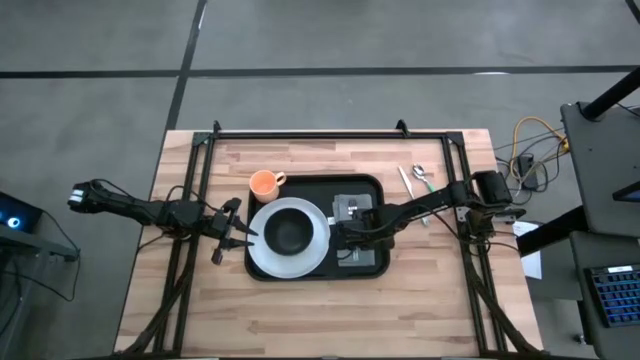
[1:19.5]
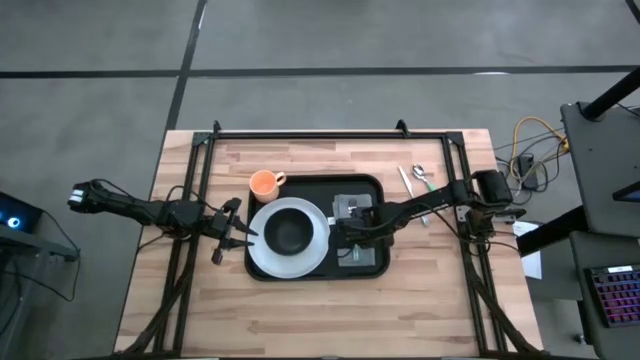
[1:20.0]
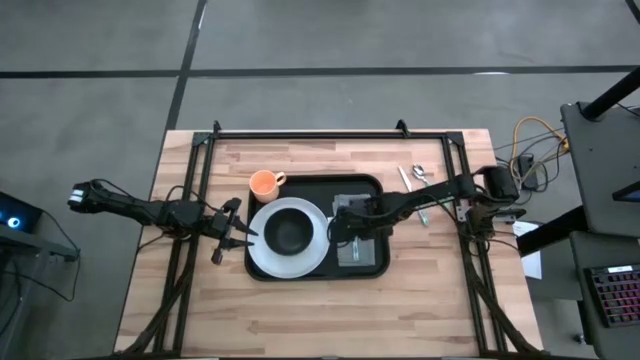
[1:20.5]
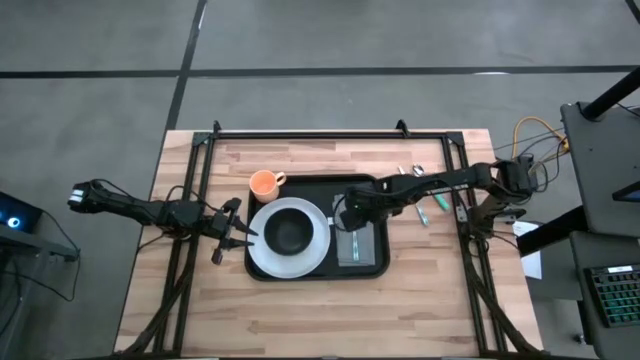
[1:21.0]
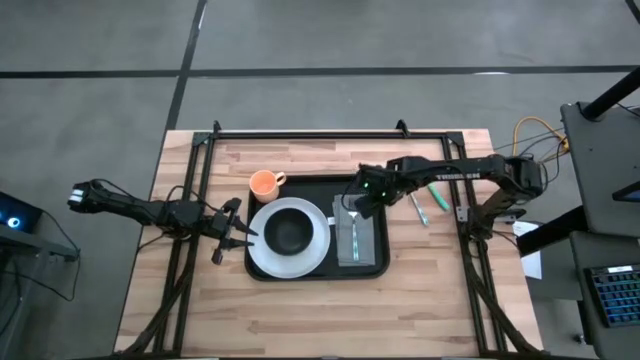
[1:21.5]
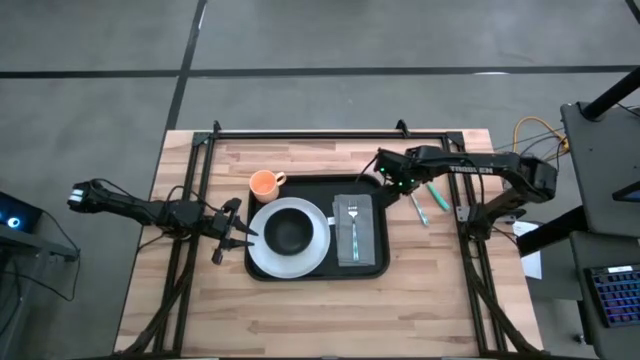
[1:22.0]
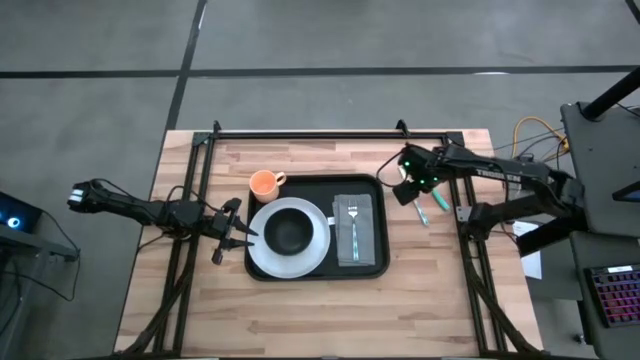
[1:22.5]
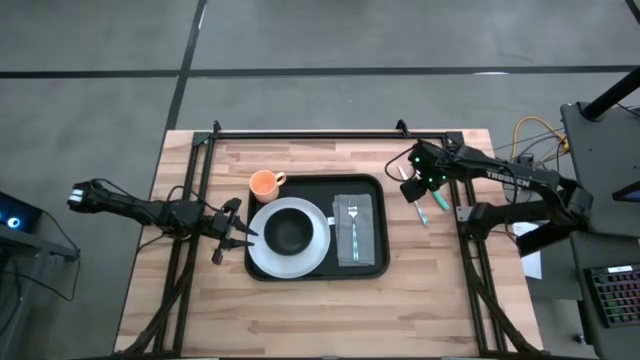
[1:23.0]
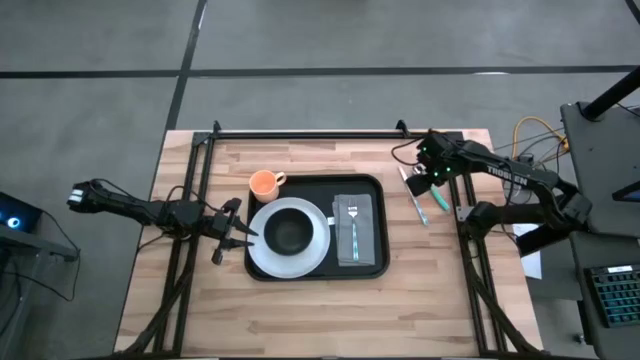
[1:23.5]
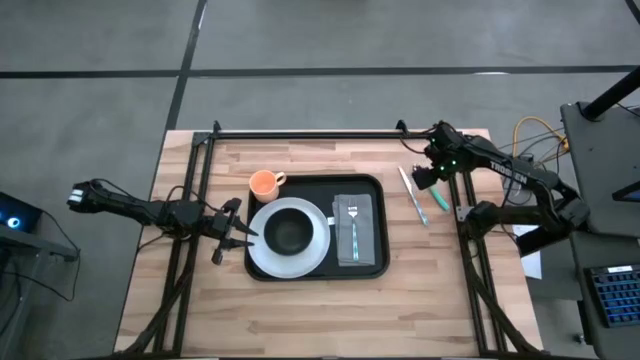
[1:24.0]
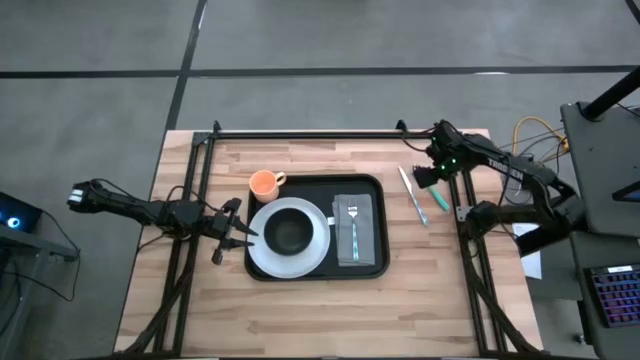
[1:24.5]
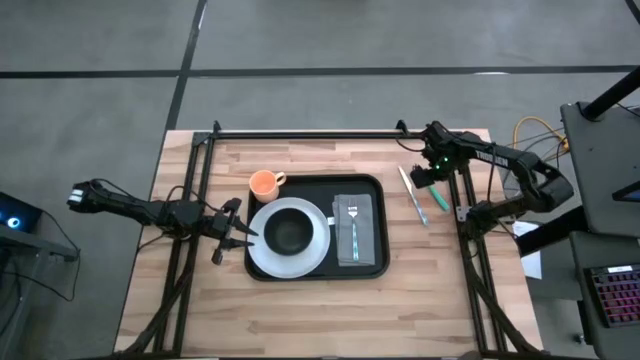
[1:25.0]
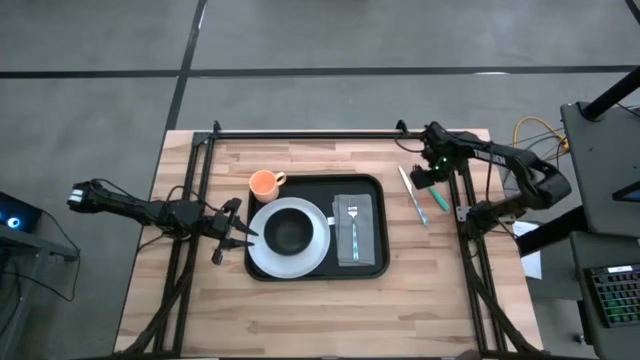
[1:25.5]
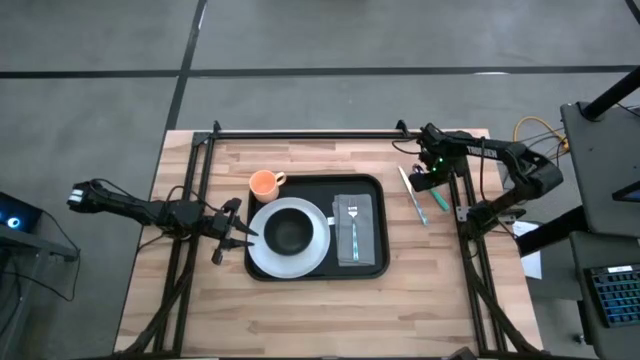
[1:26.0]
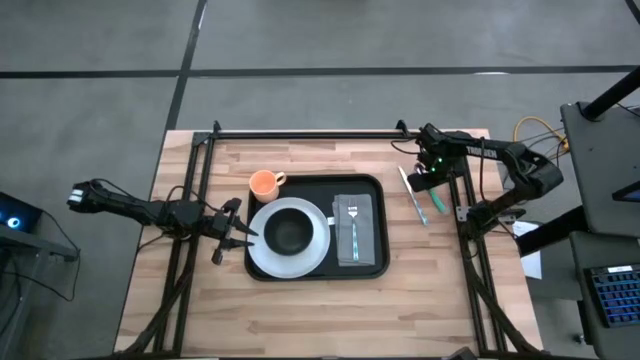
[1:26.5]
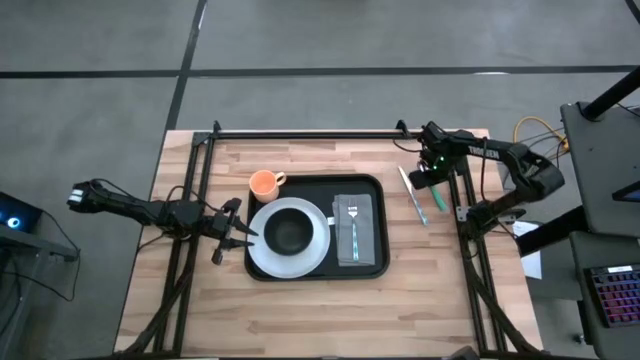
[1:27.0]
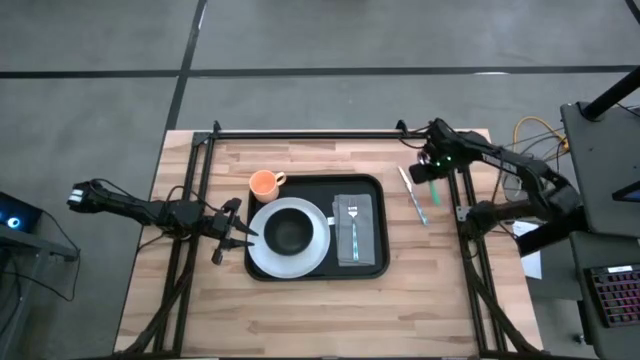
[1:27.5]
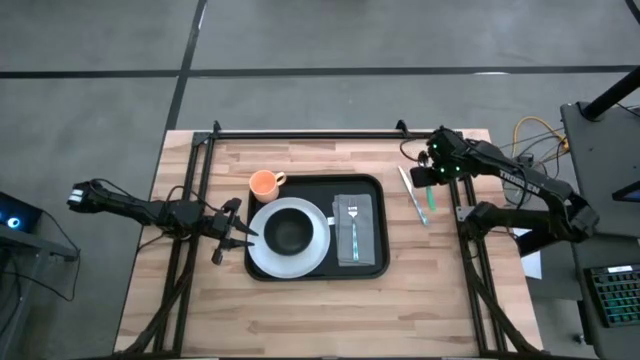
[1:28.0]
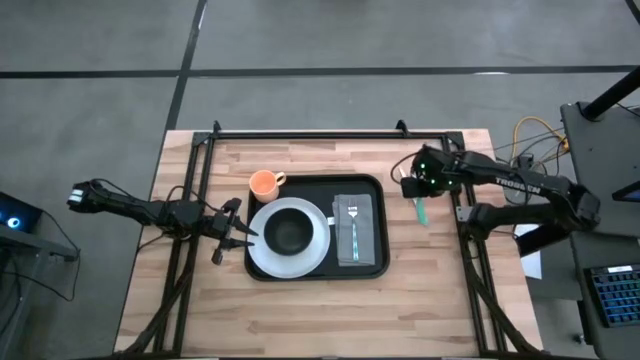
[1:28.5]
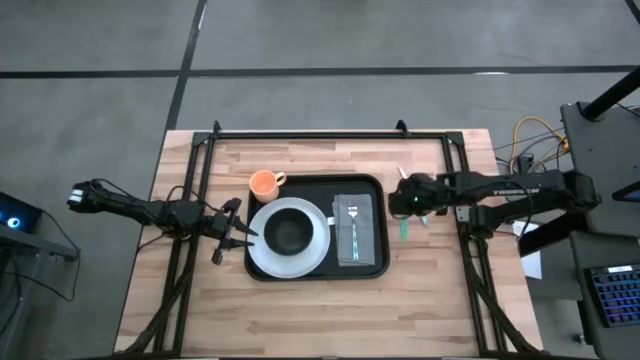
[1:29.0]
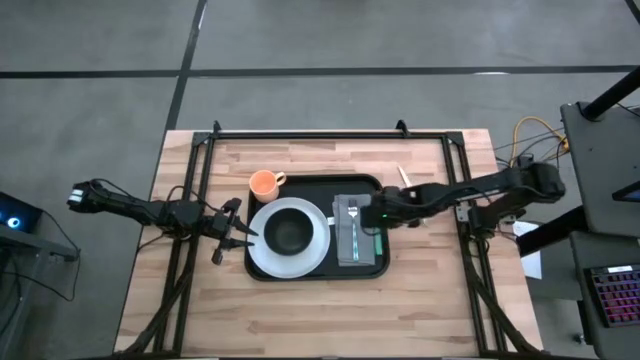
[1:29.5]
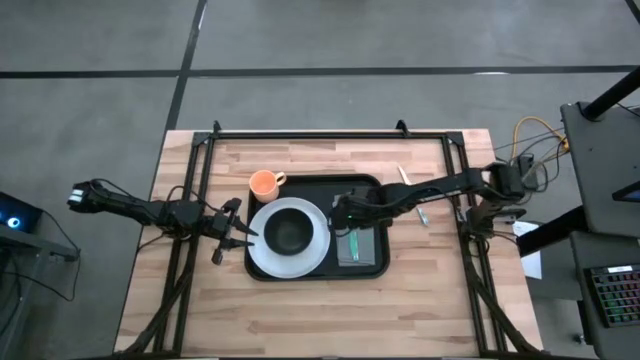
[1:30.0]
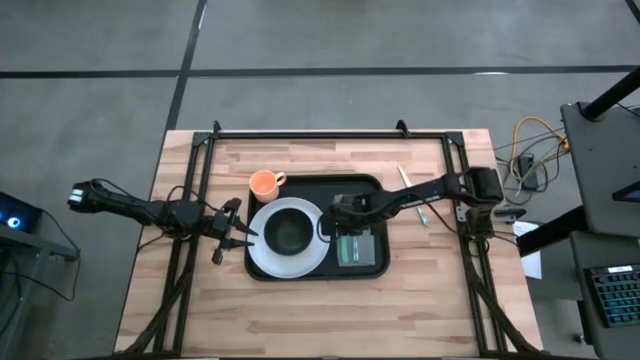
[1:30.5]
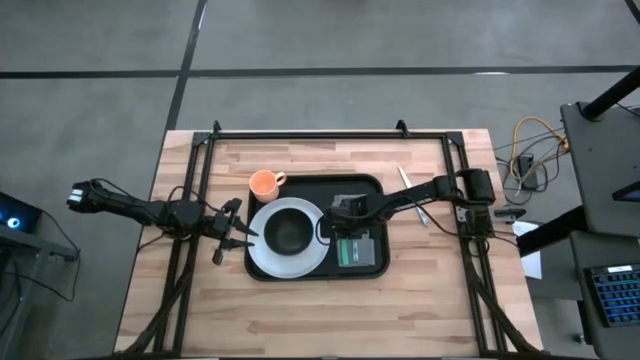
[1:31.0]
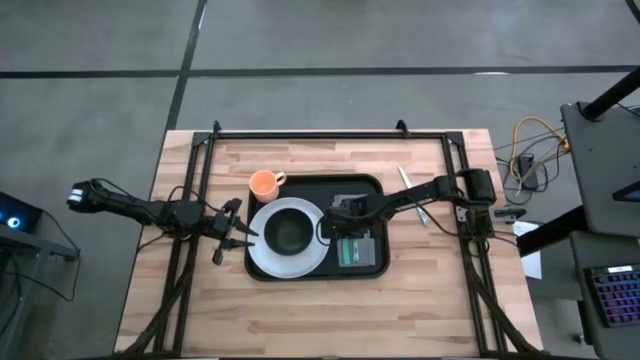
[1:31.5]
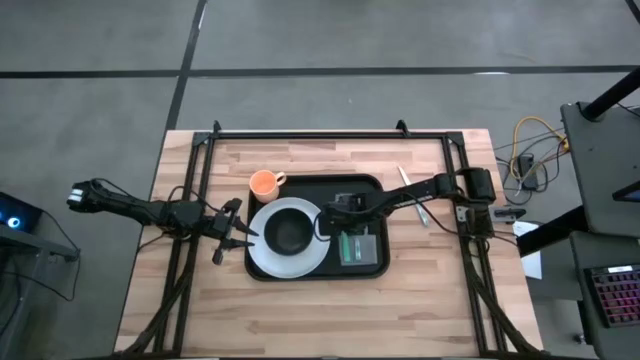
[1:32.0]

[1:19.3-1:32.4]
Task: Set up tray
Put the blue spoon to the left of the white and blue fork on the gray napkin on the black serving tray

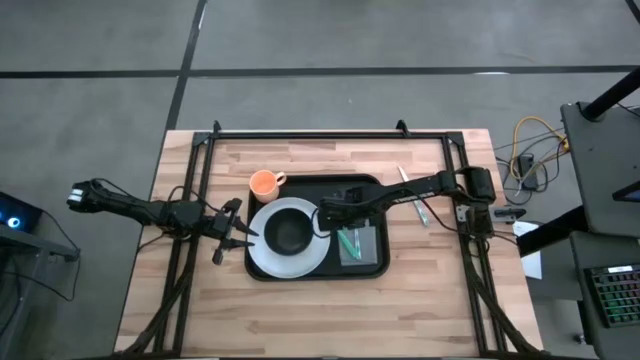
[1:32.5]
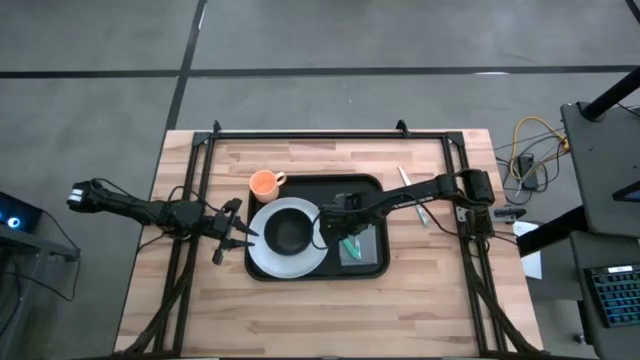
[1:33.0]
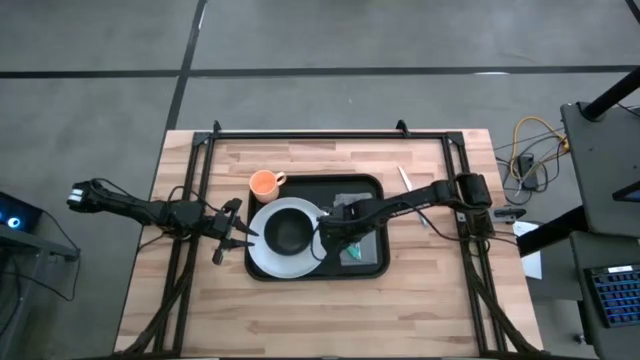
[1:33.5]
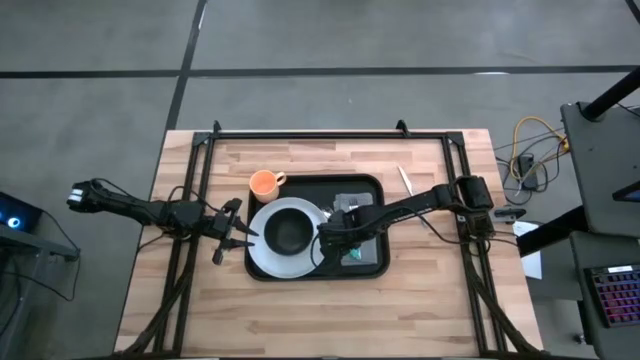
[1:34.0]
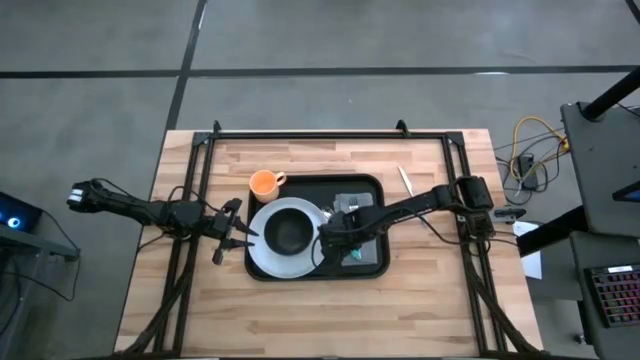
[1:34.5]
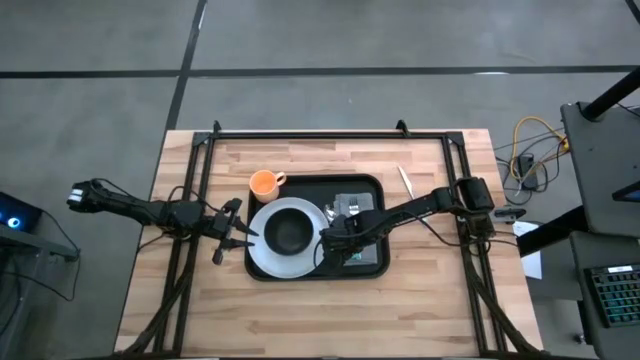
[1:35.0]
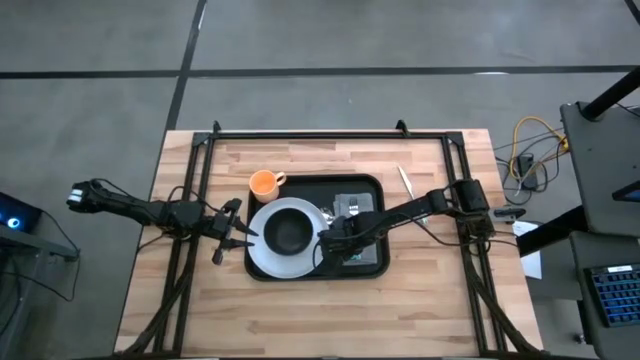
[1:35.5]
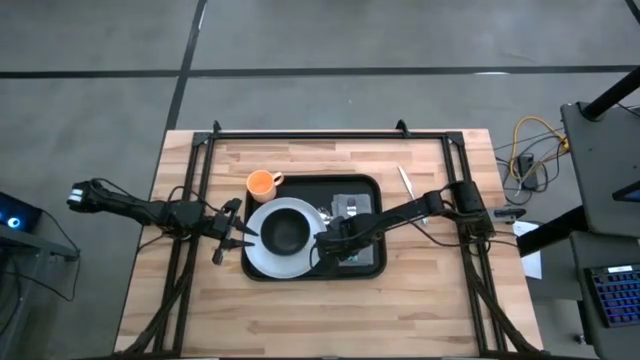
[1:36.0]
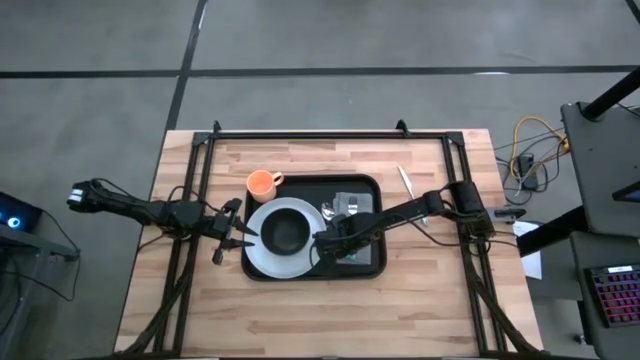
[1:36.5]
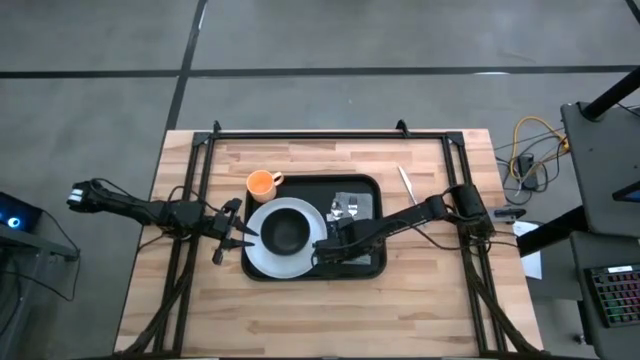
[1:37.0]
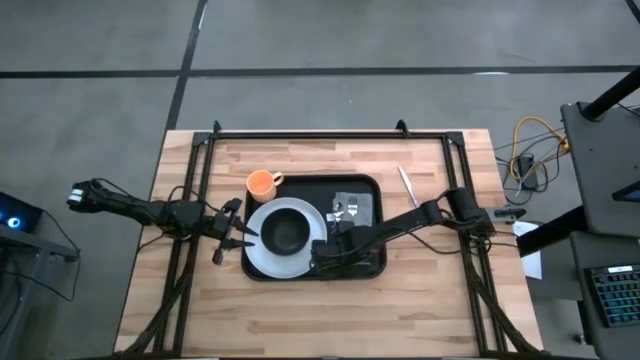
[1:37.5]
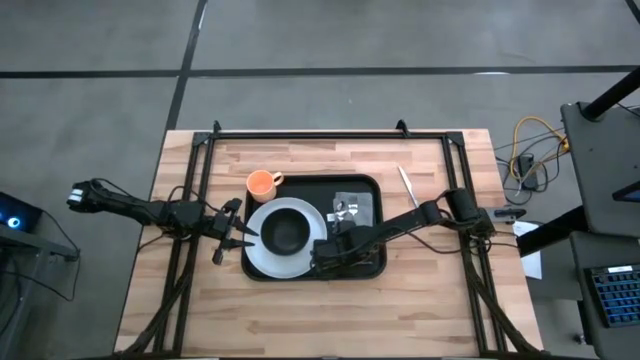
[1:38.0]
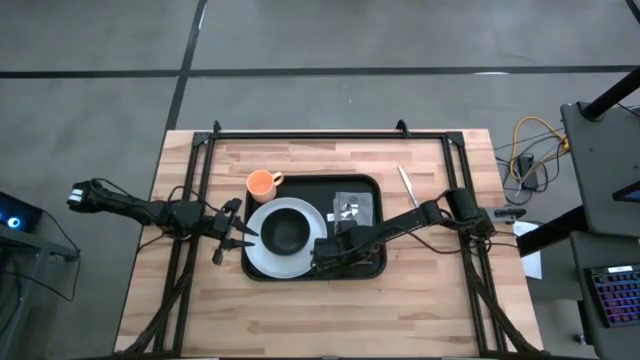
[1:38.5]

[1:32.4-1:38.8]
Put the blue spoon to the left of the white and blue fork on the gray napkin on the black serving tray

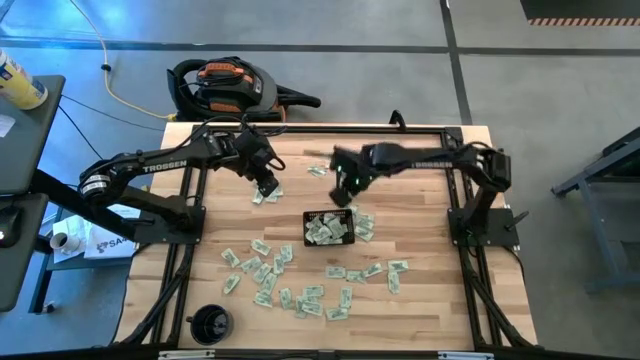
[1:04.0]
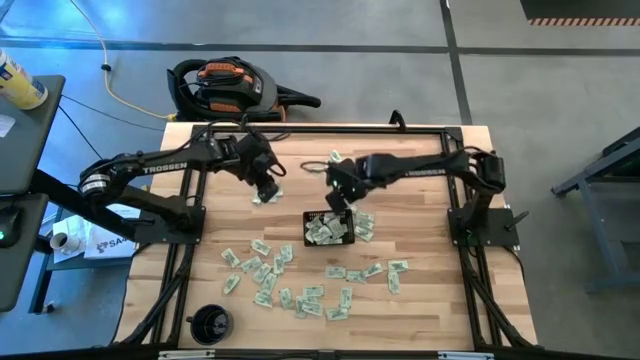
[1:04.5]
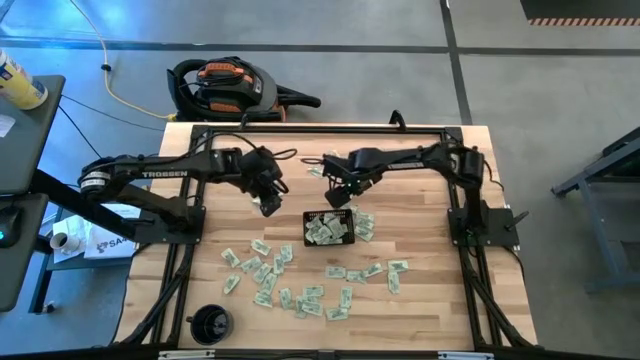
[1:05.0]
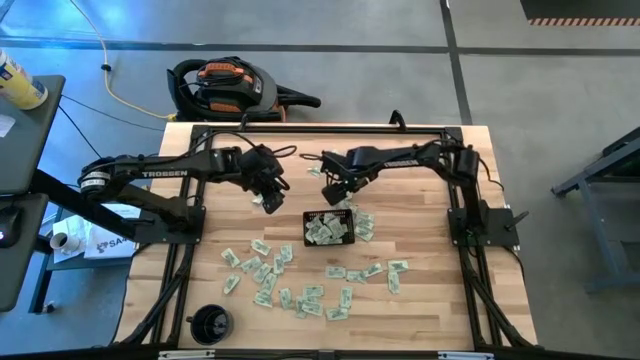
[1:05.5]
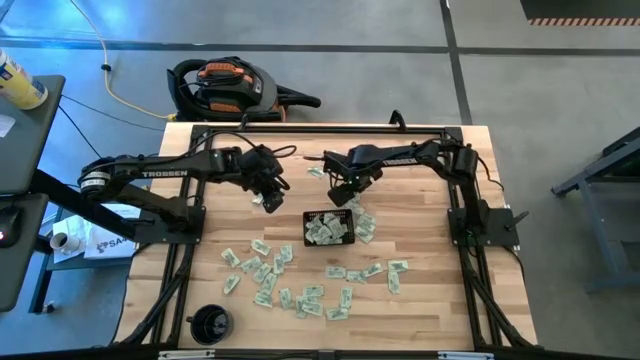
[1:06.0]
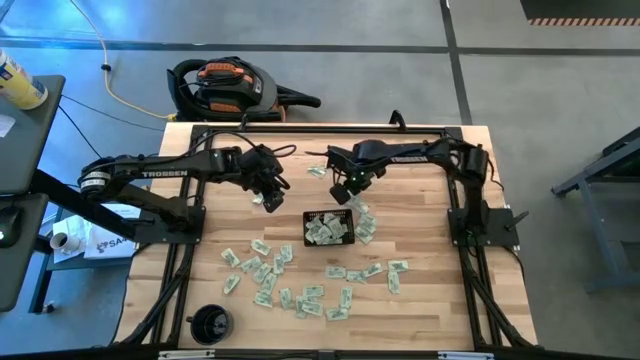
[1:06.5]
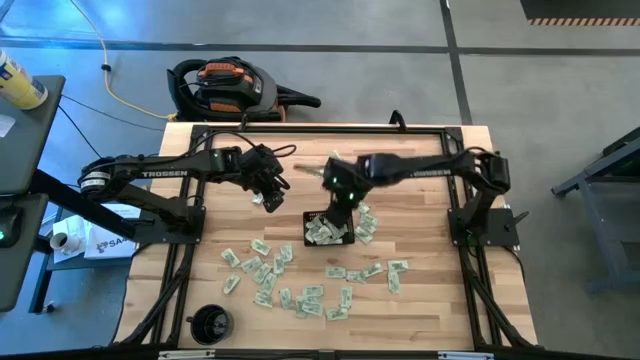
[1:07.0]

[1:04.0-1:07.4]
Task: Pick and place Stevia / Truvia into bins
Put the green stevia packet into the black basket
